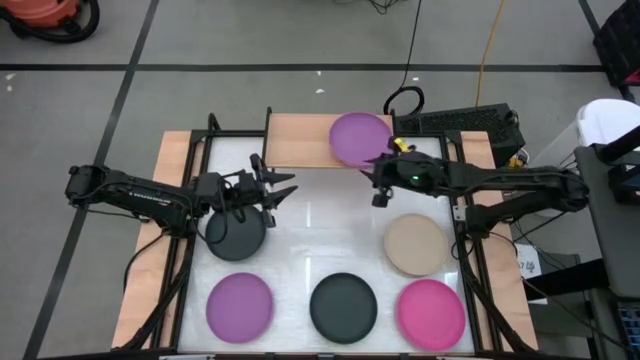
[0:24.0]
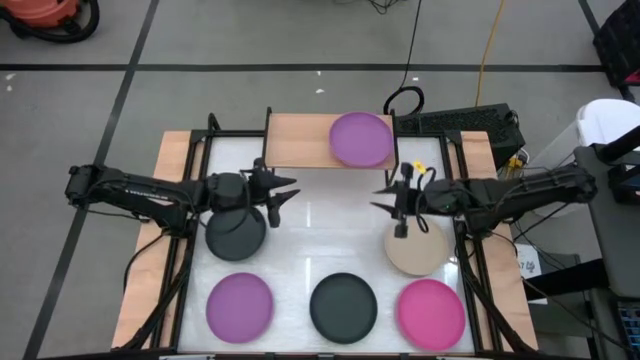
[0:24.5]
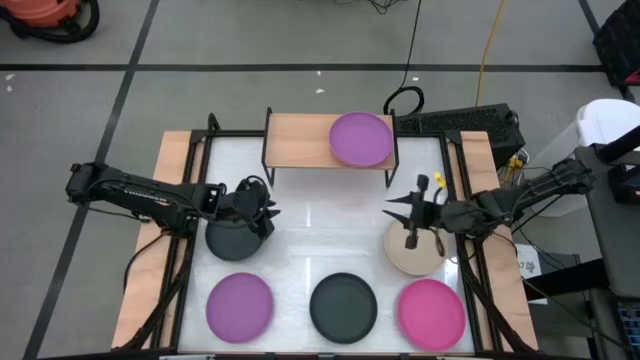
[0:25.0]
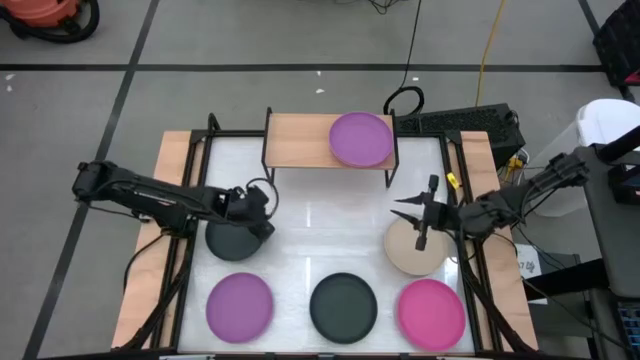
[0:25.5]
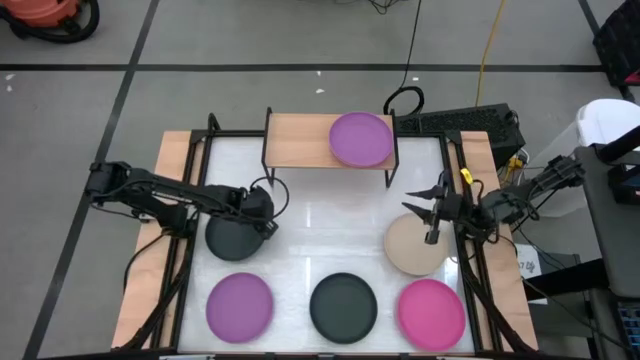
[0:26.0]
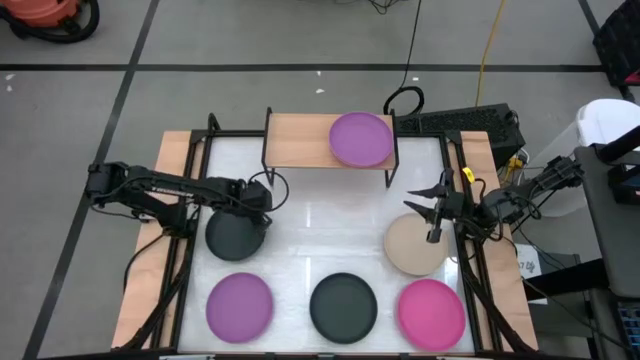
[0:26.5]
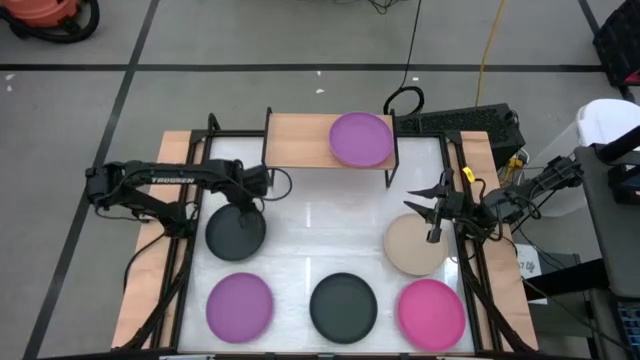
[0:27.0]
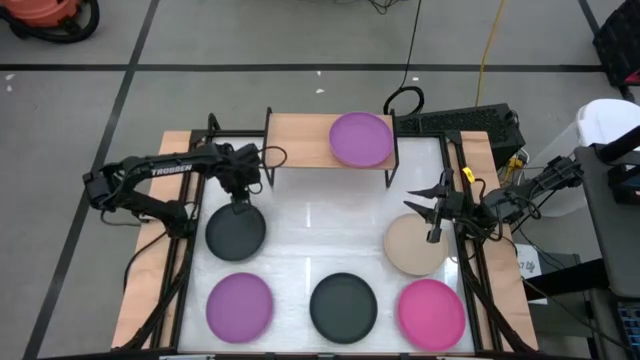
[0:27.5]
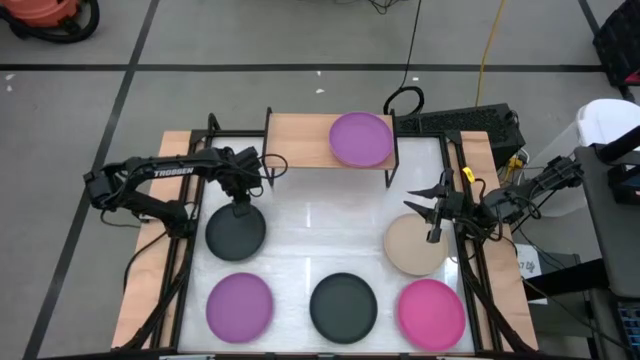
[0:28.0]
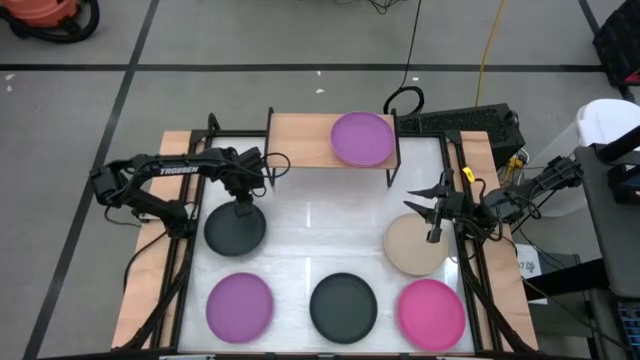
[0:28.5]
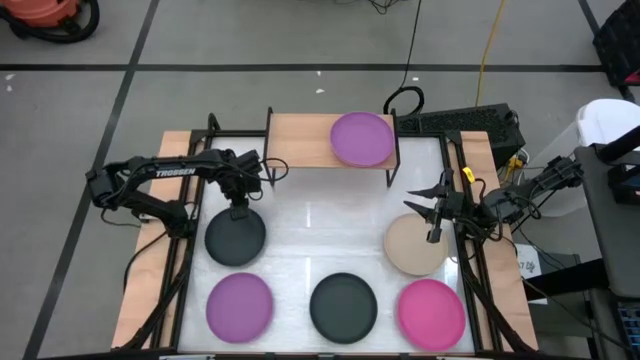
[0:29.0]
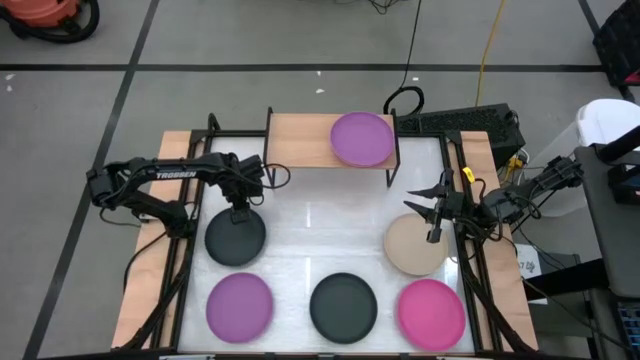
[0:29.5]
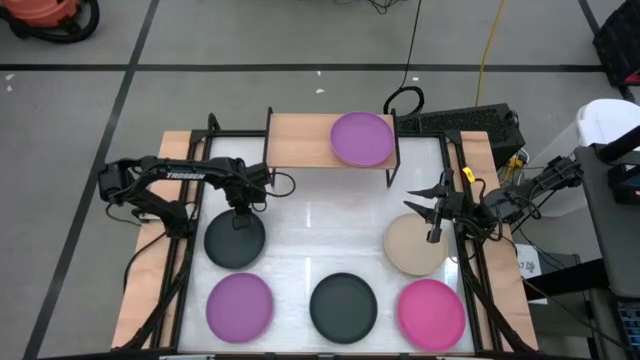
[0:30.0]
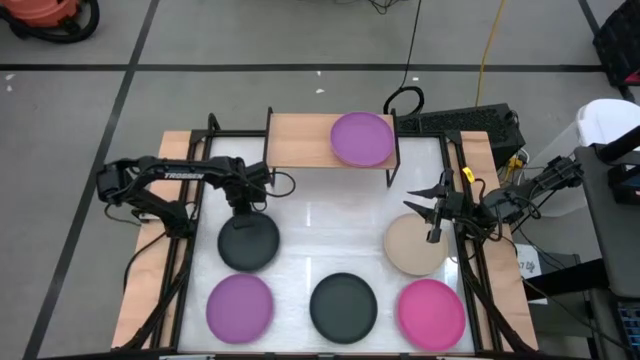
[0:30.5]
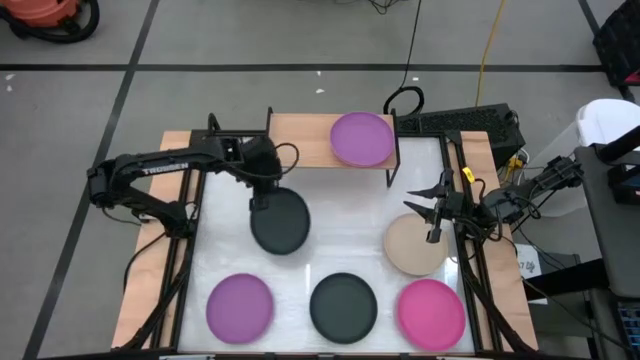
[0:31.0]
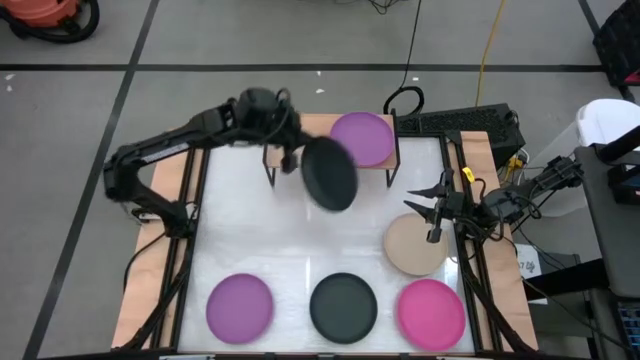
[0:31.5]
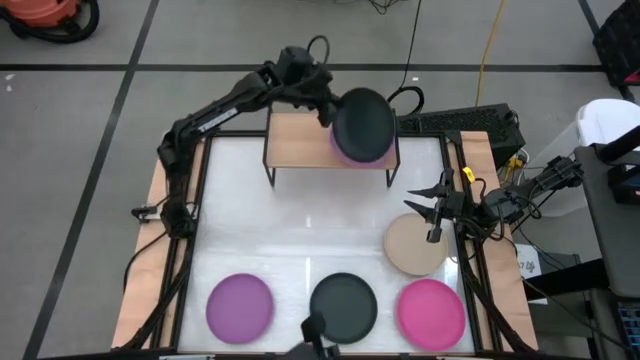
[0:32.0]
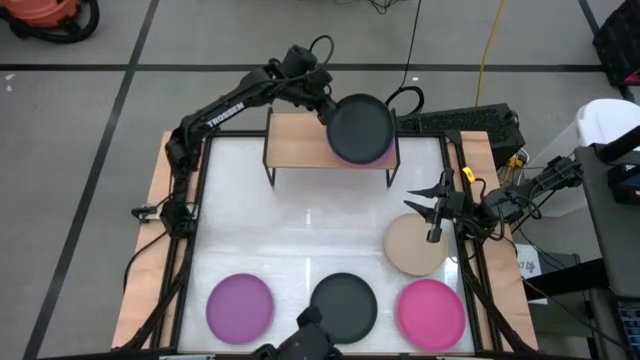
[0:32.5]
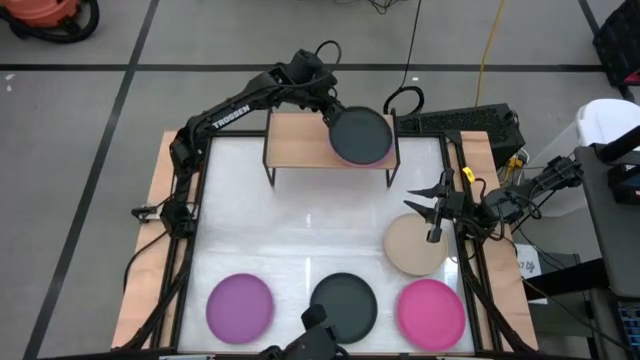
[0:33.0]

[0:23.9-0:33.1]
Task: Place and stack plates onto a shelf
Stack the top black plate on top of the violet plate on the shelf

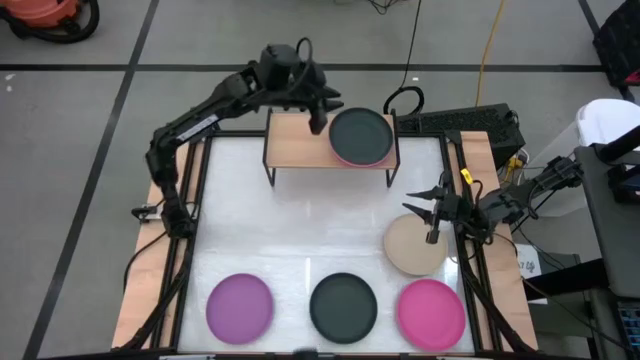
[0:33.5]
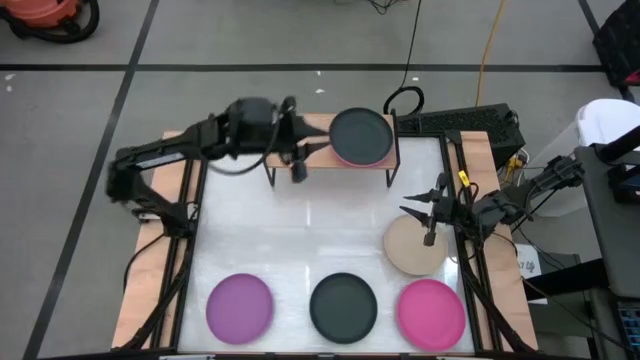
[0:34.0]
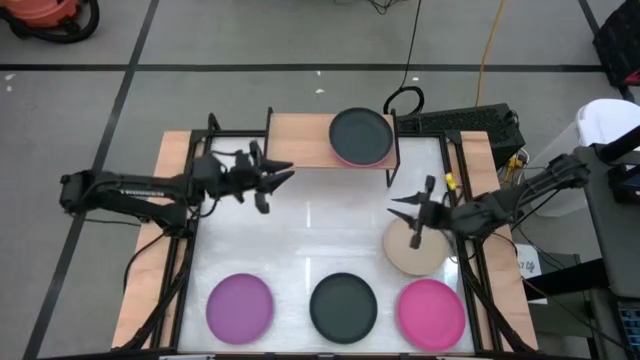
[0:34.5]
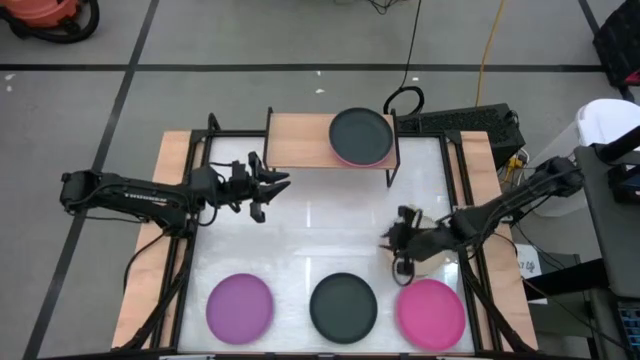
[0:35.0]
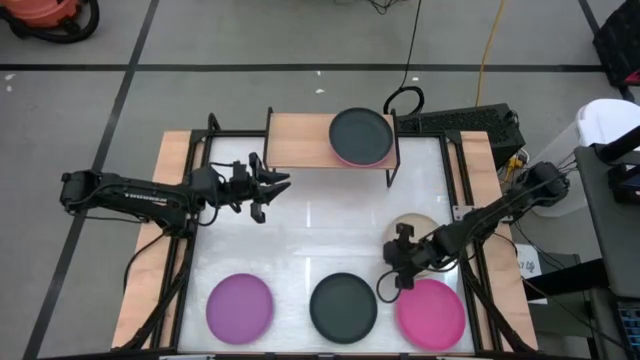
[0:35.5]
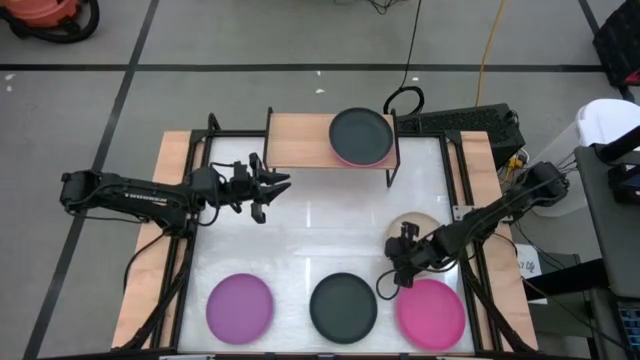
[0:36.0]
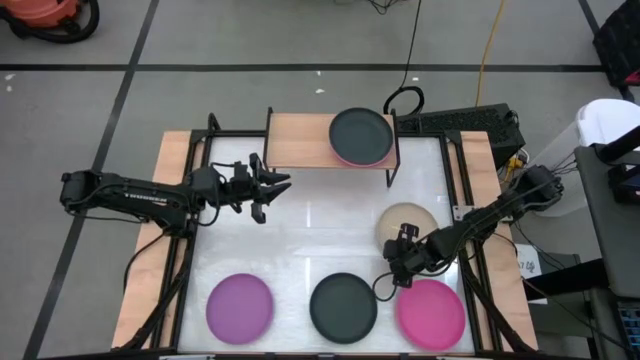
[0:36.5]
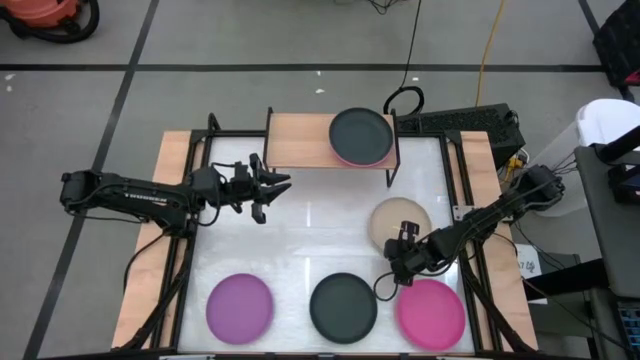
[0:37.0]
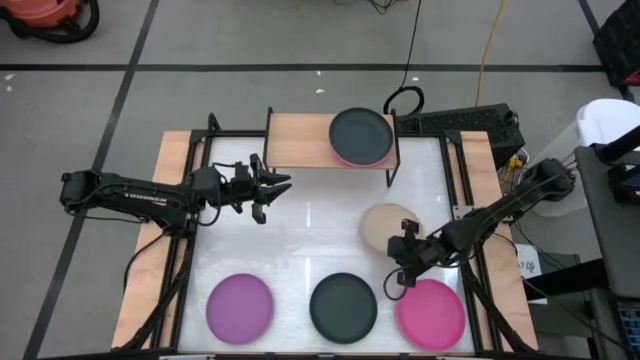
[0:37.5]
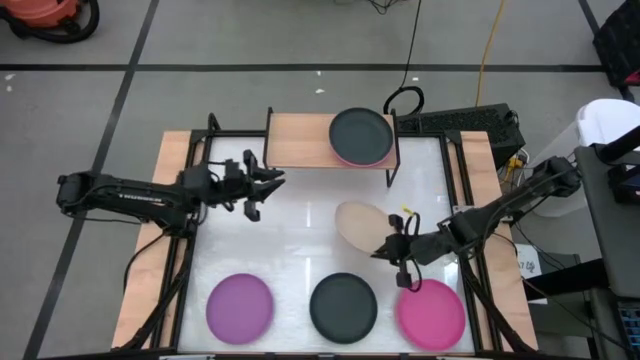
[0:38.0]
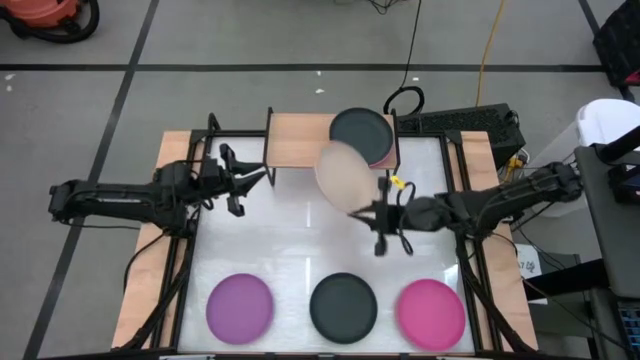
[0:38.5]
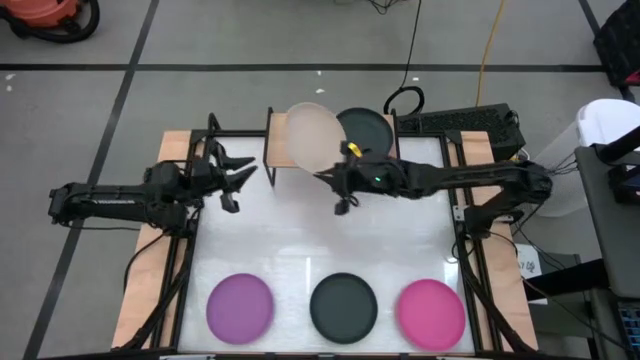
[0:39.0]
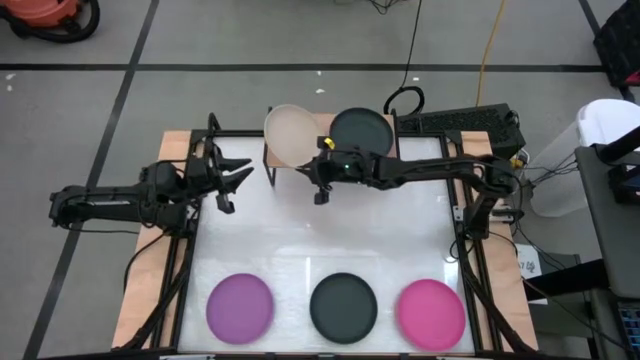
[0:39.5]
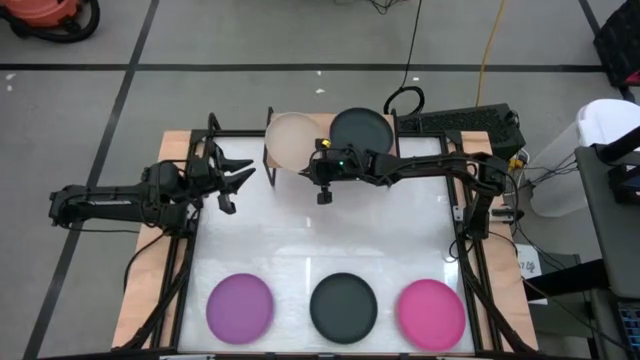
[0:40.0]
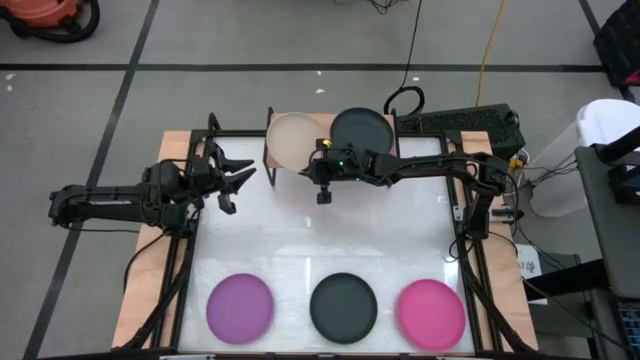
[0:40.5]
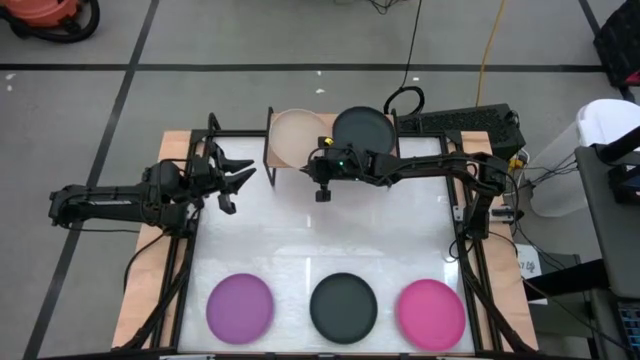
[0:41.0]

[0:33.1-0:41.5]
Put the gray plate on the shelf

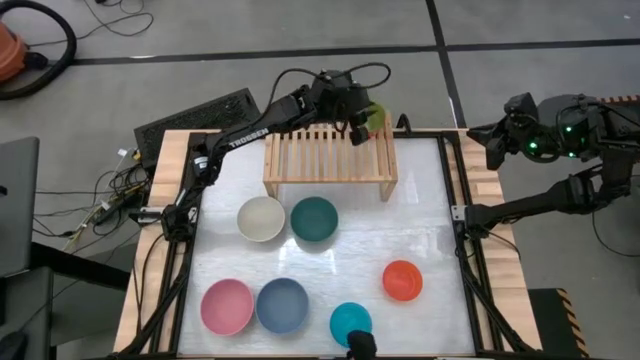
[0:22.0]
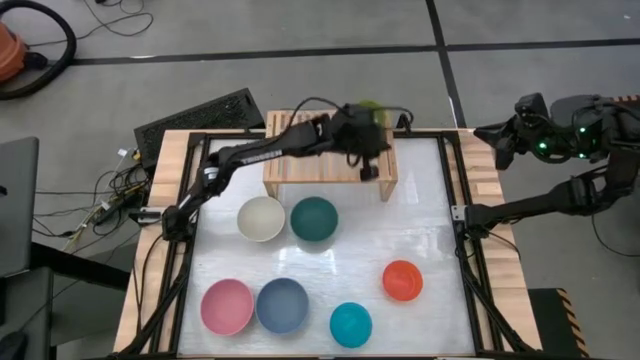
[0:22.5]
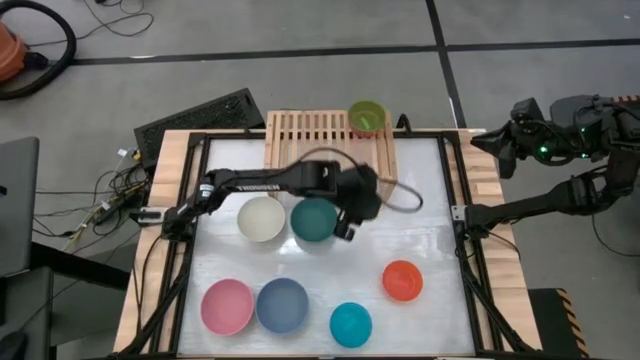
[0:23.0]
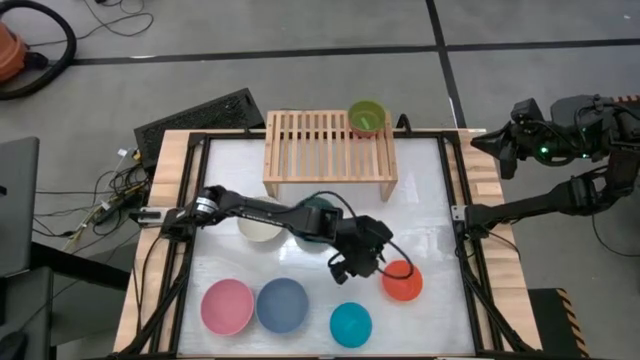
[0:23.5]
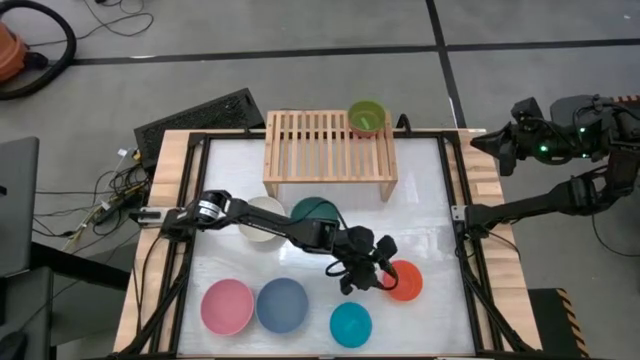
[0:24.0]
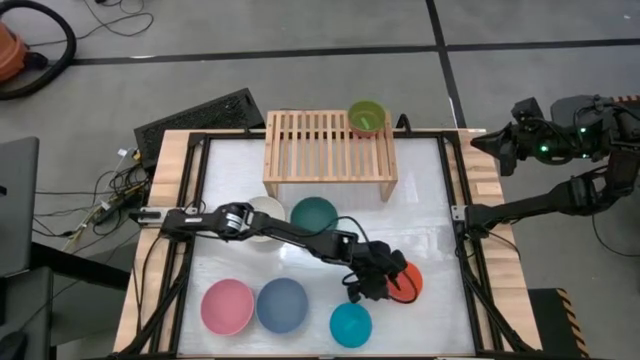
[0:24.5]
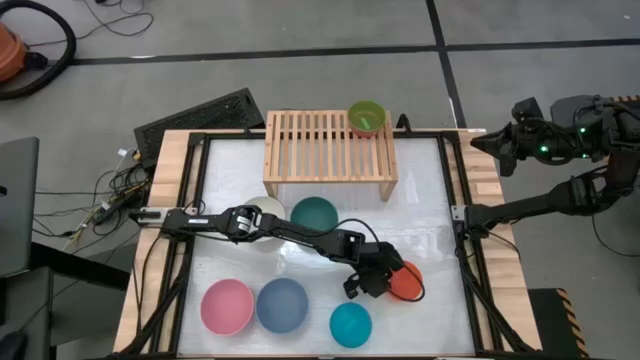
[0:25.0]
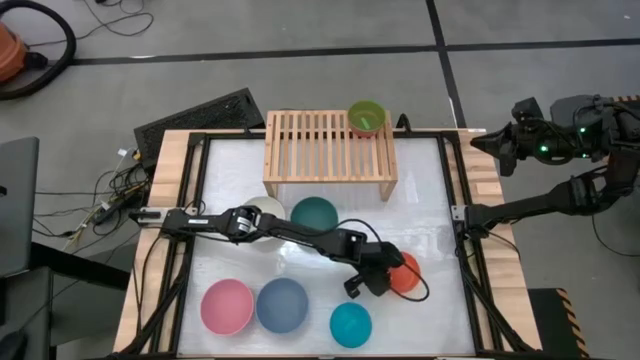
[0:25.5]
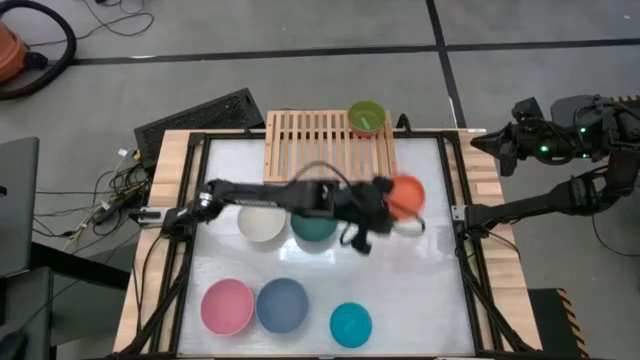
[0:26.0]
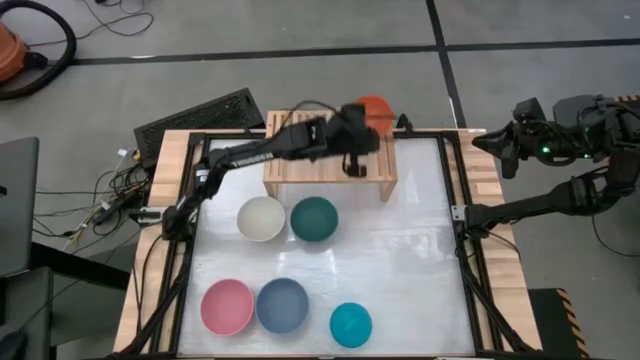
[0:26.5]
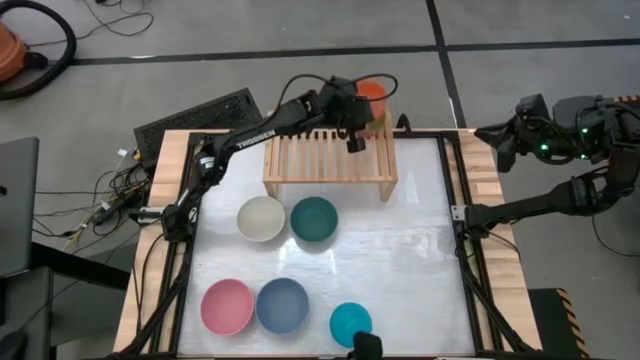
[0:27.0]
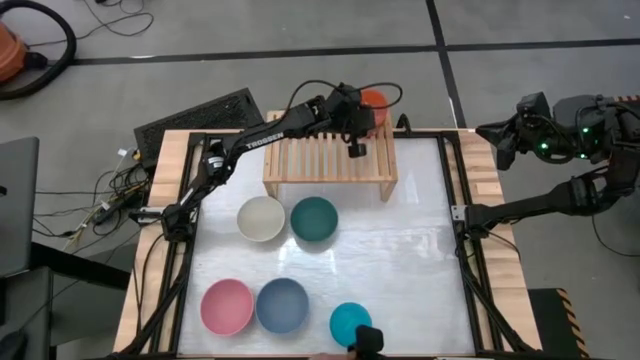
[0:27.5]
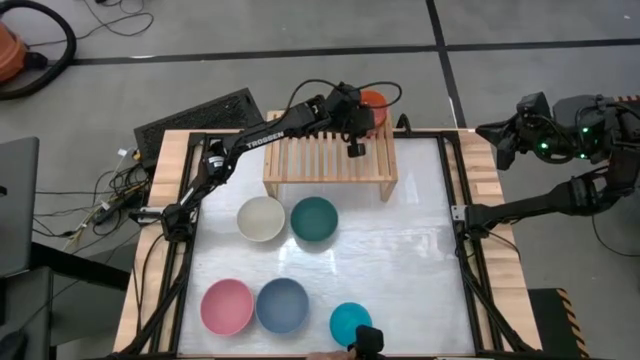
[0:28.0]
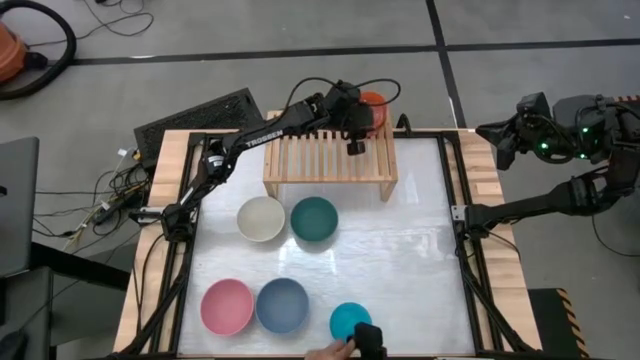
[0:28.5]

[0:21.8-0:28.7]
Task: Place and stack bowls onto a shelf
Stack the small orange bowl on top of the small green bowl
